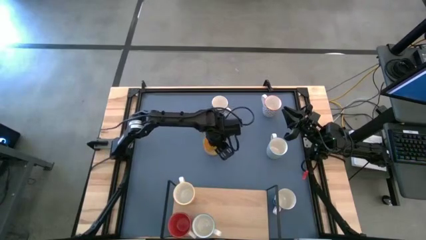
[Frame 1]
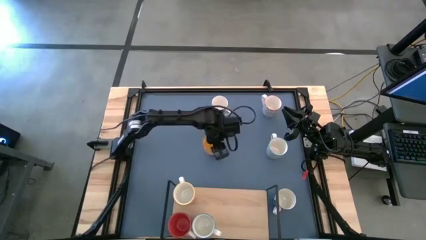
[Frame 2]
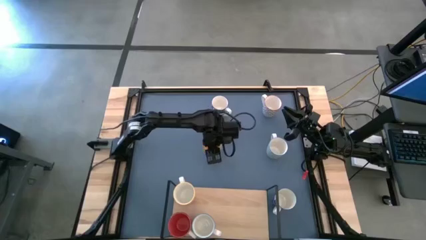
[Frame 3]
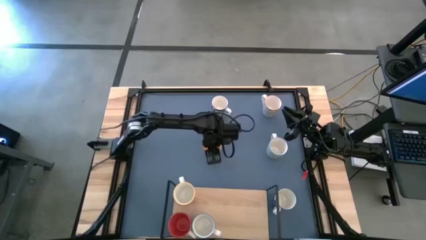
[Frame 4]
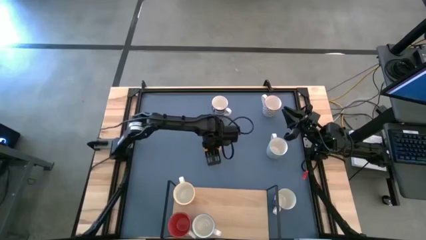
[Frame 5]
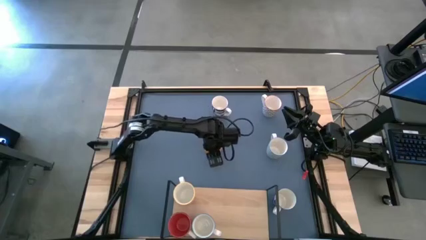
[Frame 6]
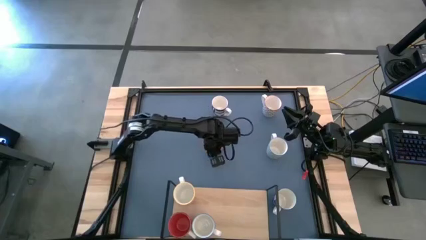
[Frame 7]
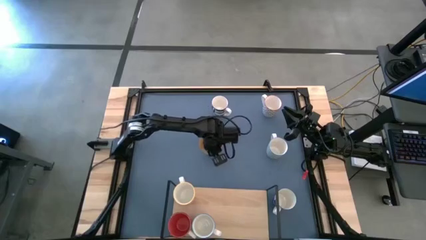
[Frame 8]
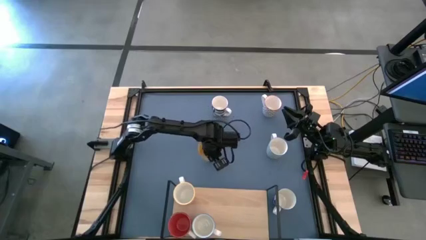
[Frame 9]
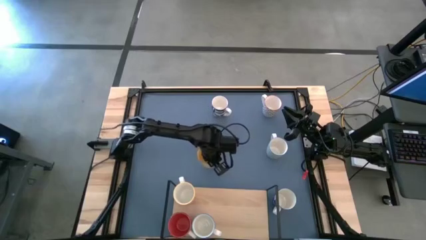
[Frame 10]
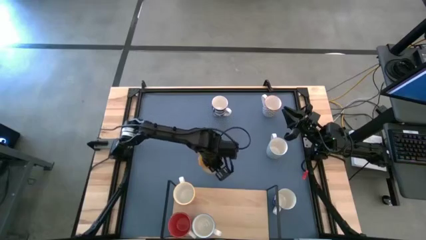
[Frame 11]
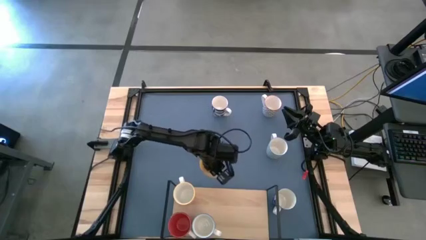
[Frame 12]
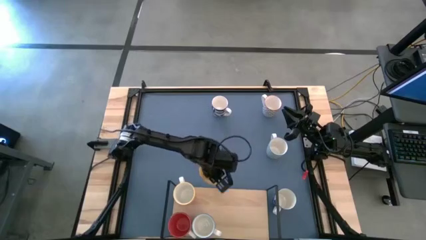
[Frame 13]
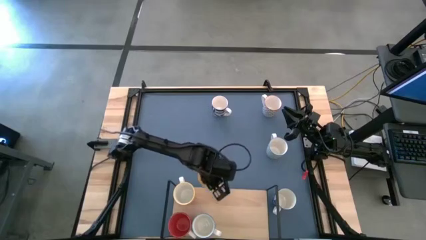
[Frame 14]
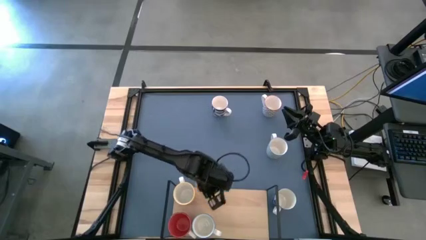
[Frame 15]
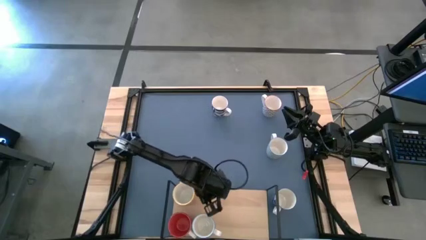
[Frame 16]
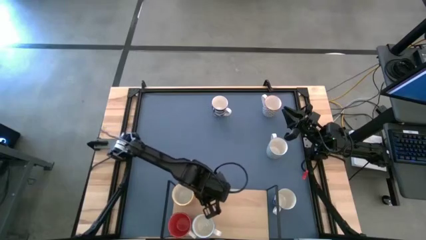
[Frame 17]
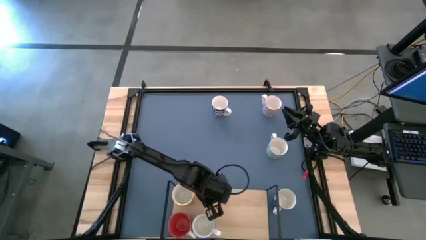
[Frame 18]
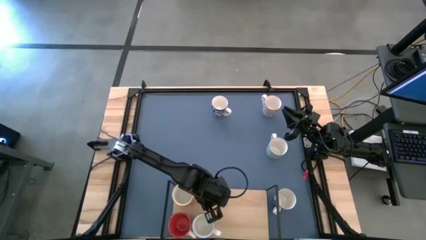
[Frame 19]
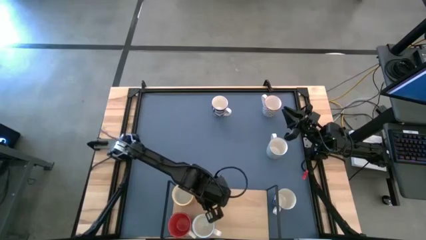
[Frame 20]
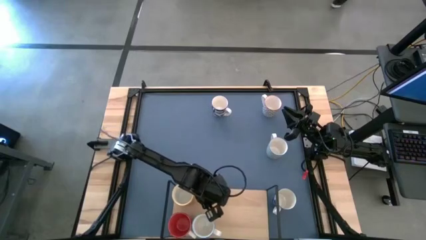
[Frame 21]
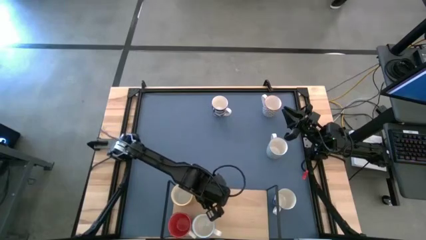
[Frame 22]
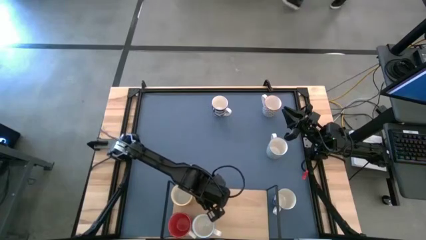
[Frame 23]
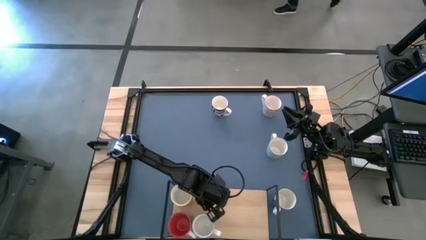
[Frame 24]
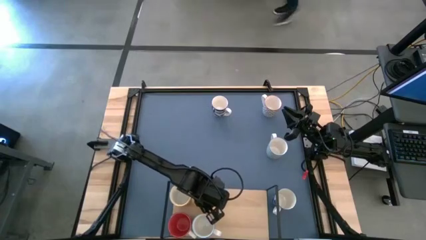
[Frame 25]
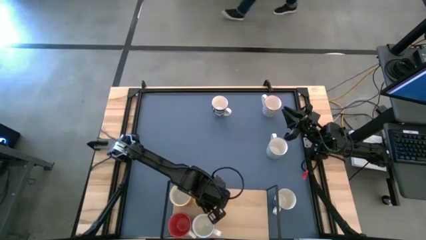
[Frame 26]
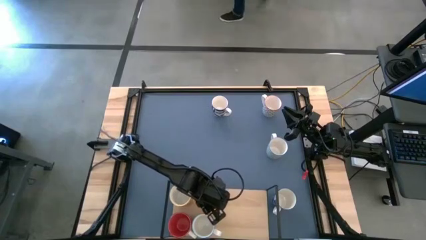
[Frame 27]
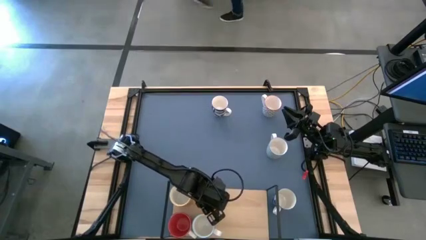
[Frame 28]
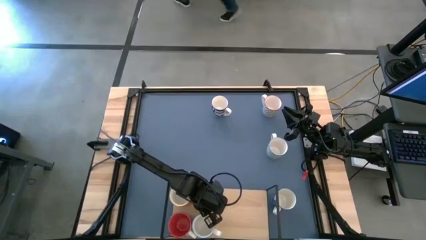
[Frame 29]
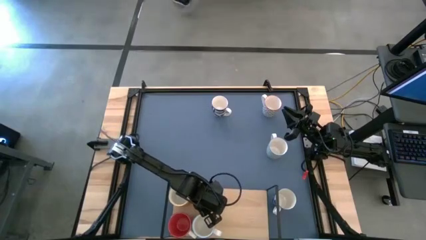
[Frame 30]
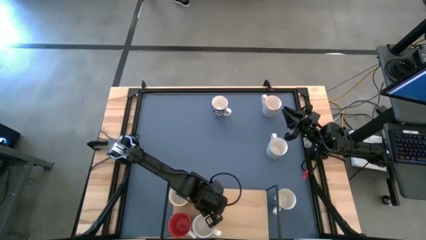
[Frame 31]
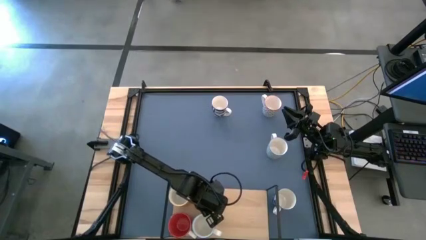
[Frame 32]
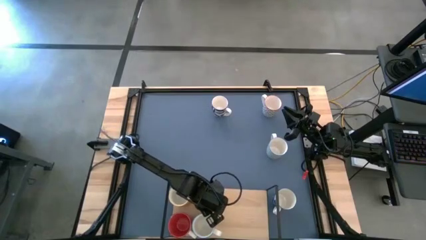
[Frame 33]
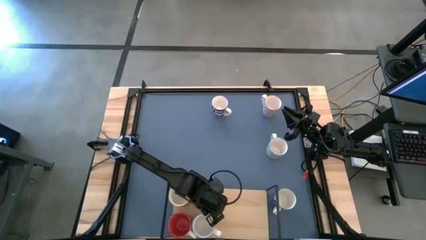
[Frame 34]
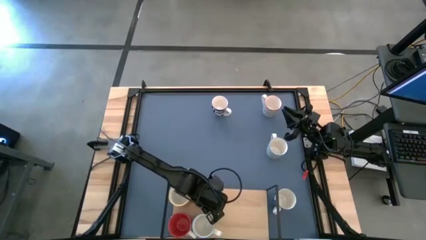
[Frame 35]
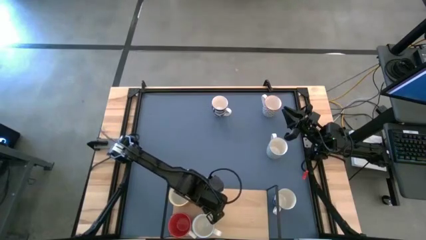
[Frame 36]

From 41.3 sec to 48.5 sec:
Task: Place coffee mugs
Put the yellow mug on the shelf

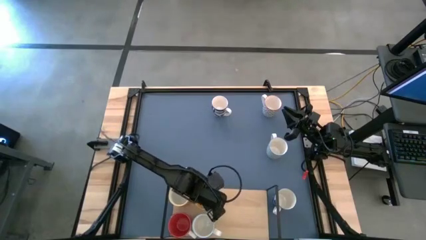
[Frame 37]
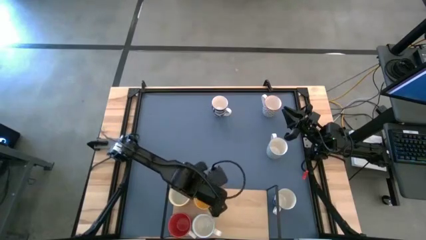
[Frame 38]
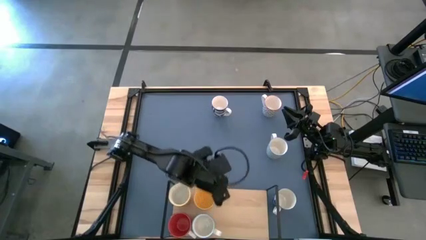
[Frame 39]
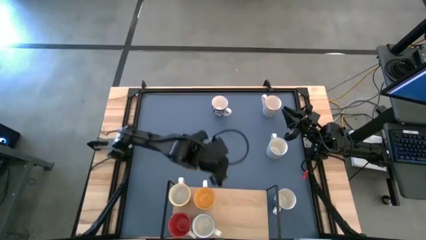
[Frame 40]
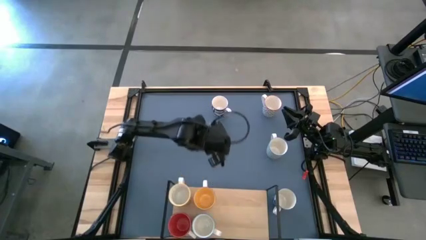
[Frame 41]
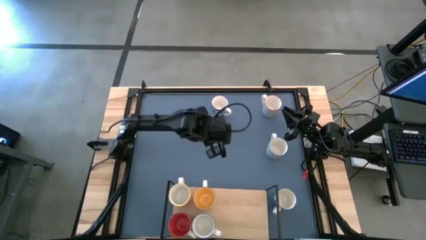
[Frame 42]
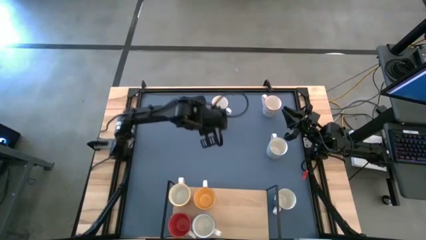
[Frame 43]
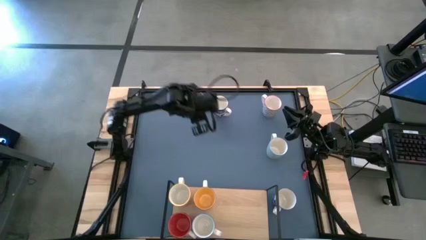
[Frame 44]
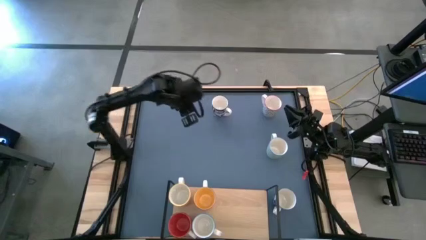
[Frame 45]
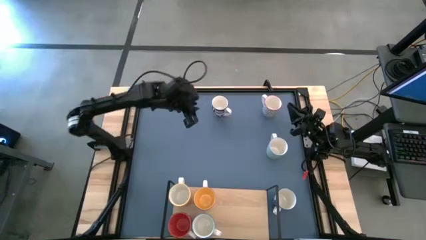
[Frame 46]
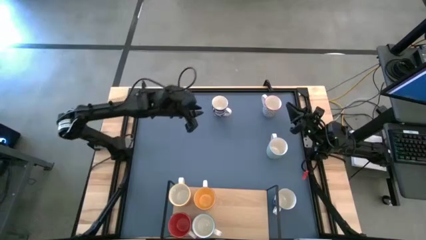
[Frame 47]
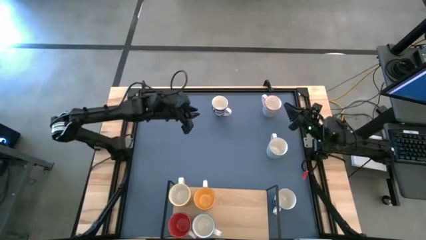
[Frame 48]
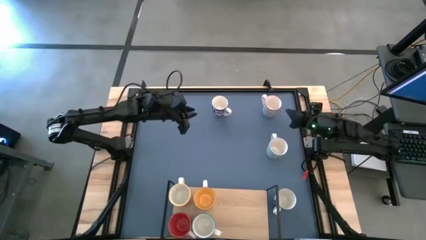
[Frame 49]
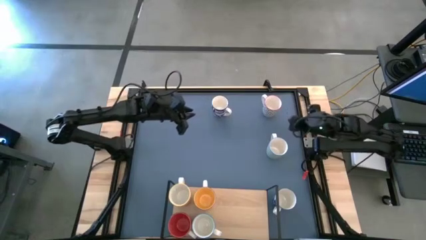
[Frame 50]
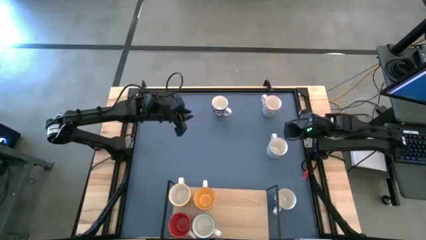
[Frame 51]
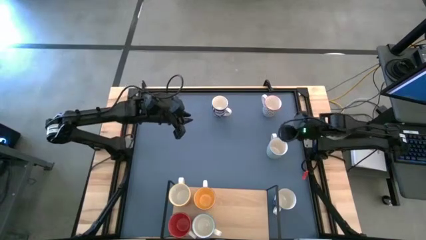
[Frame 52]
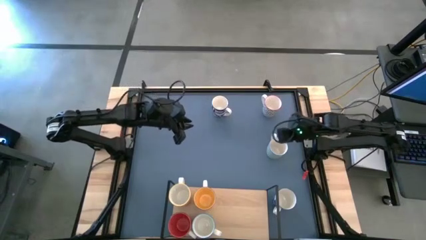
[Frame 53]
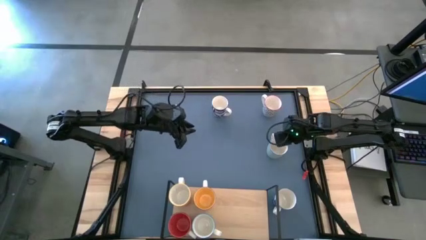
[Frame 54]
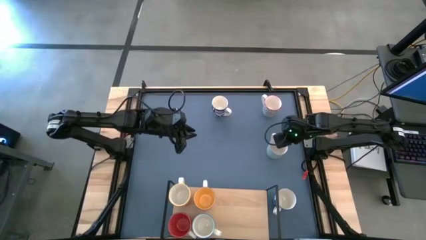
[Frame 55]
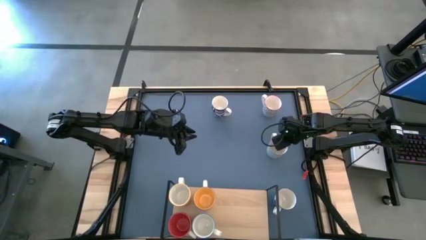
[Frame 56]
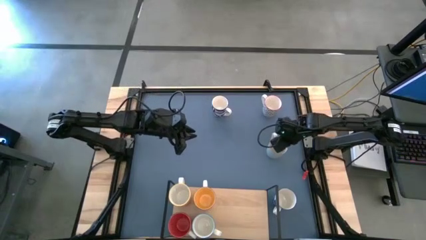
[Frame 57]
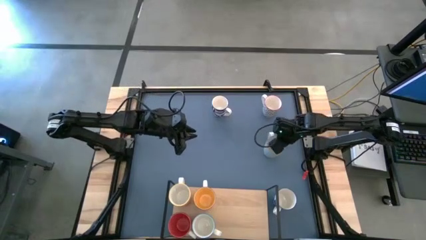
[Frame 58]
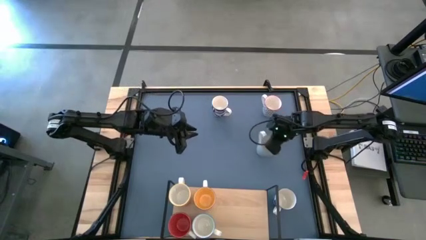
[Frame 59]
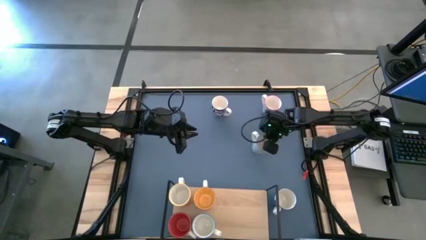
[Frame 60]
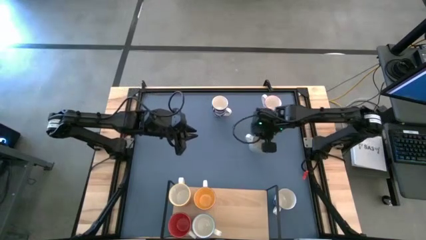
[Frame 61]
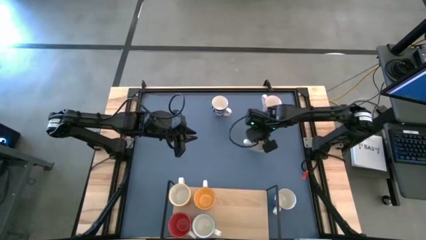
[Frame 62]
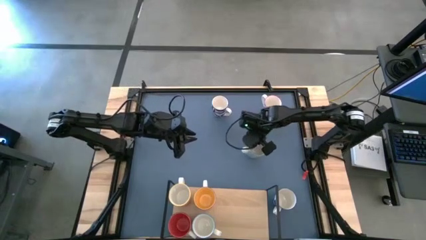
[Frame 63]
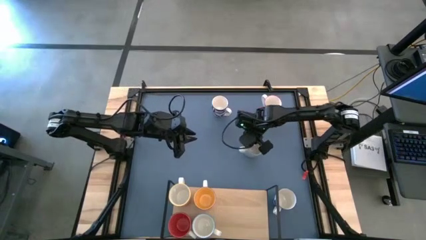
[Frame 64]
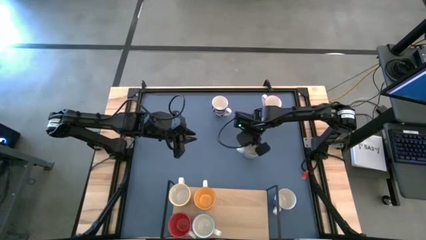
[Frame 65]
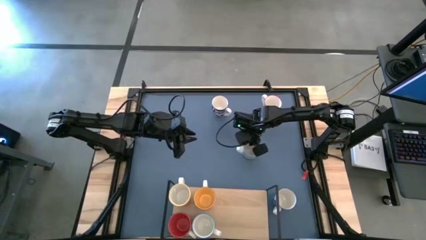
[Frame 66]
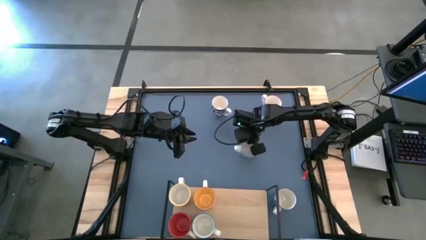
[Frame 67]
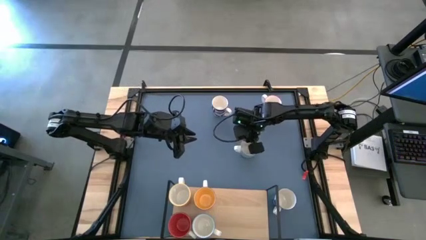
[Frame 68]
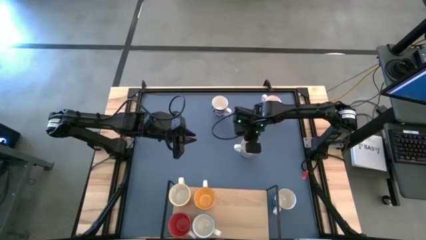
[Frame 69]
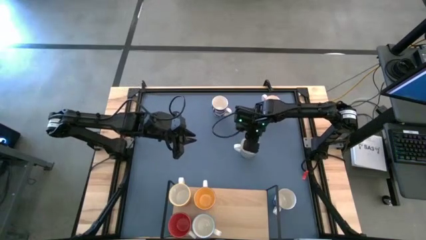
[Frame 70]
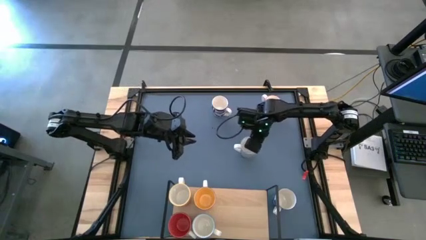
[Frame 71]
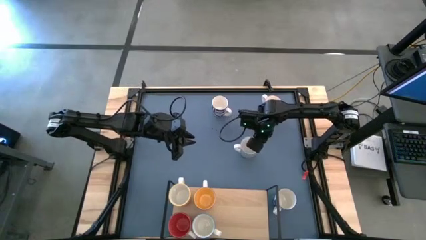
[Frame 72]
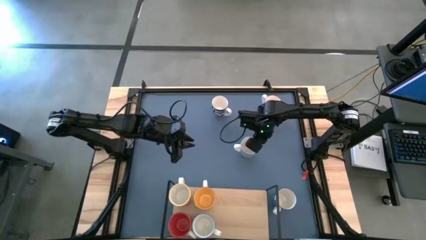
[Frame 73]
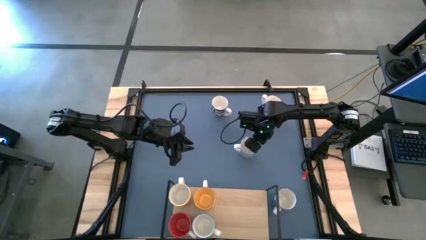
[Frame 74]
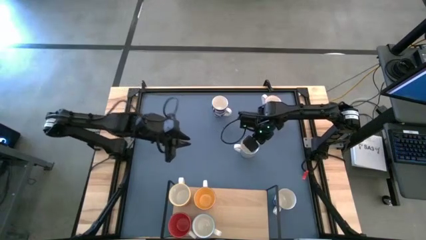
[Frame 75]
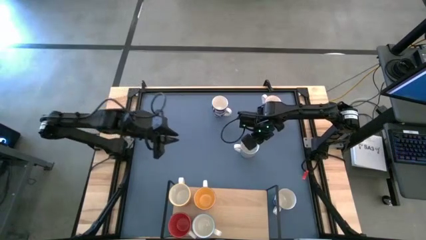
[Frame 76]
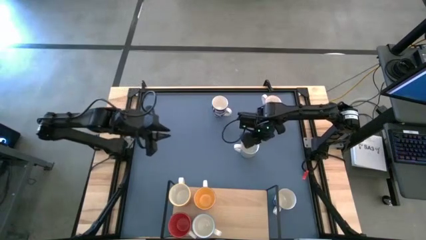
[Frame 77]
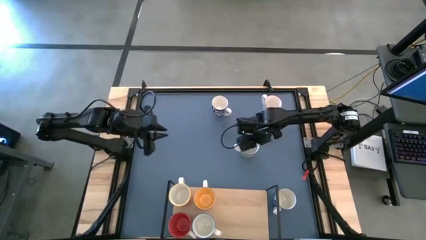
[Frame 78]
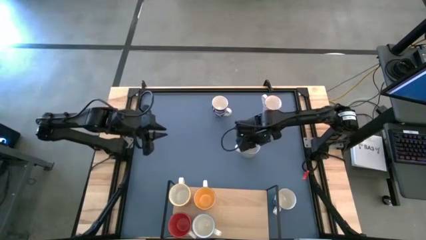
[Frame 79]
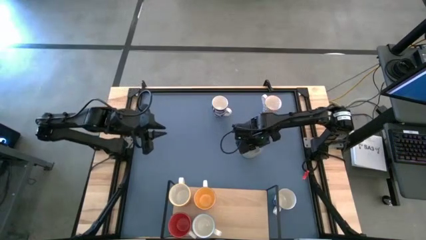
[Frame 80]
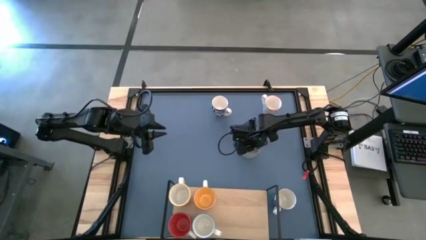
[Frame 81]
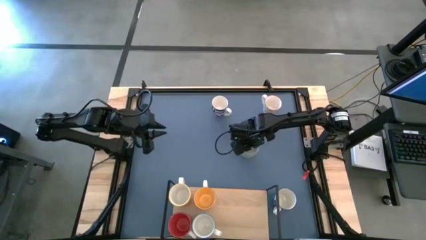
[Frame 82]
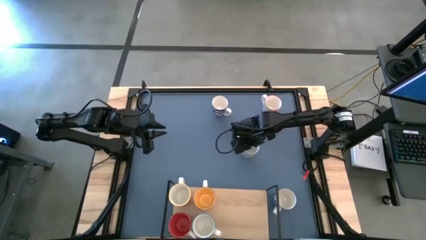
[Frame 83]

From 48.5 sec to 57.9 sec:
Put the light blue patterned mug on the shelf
